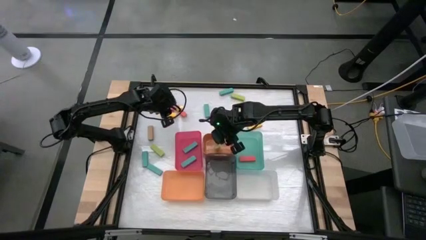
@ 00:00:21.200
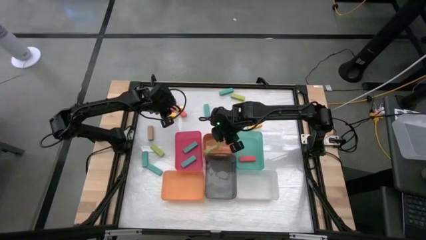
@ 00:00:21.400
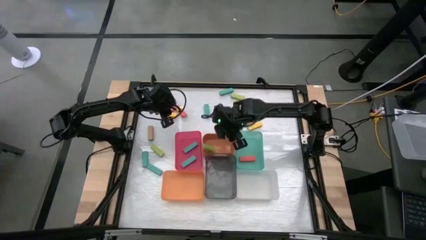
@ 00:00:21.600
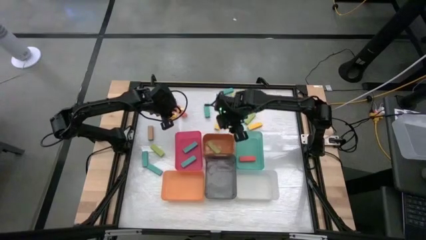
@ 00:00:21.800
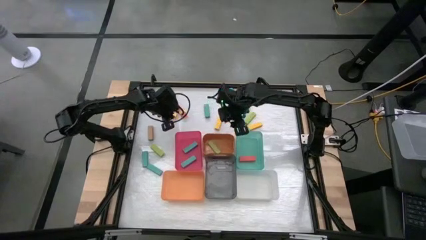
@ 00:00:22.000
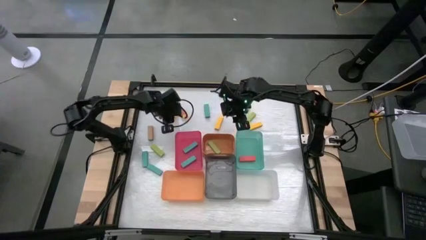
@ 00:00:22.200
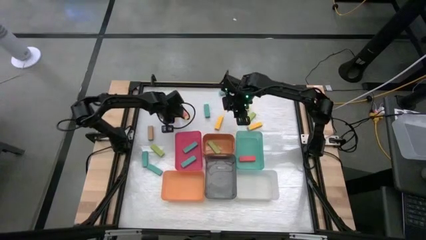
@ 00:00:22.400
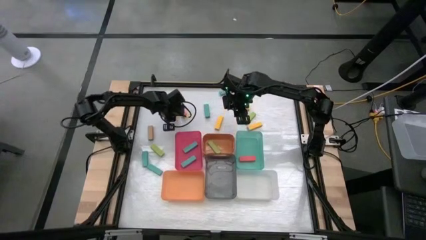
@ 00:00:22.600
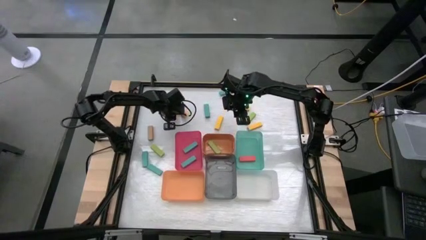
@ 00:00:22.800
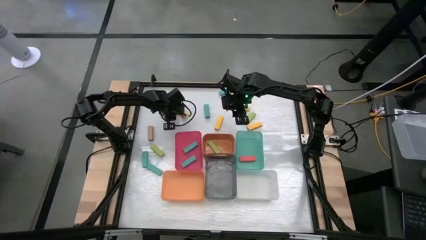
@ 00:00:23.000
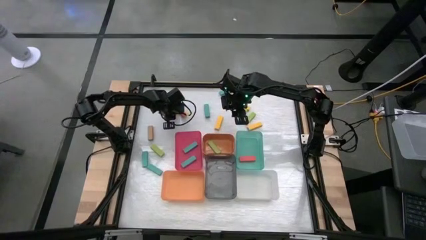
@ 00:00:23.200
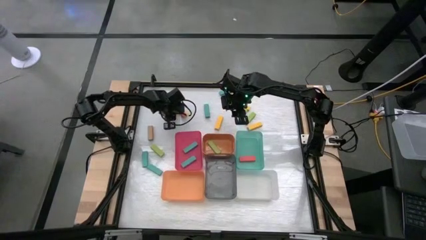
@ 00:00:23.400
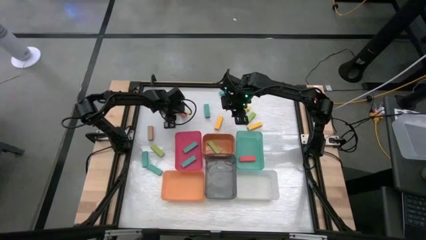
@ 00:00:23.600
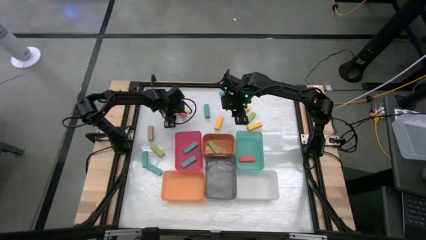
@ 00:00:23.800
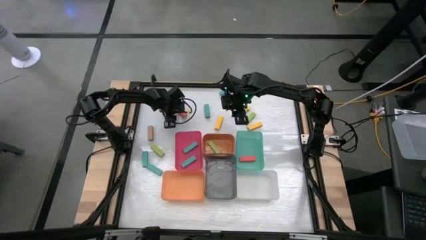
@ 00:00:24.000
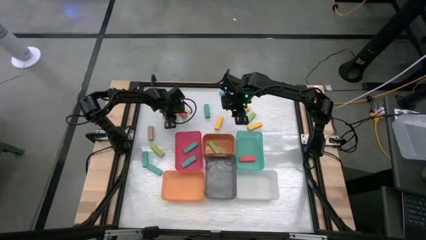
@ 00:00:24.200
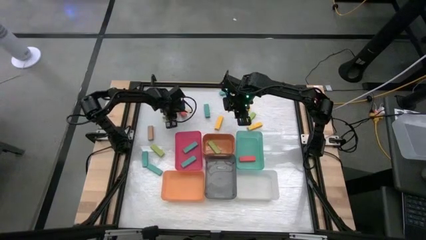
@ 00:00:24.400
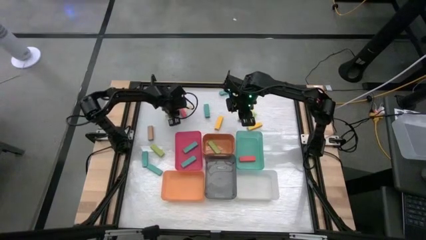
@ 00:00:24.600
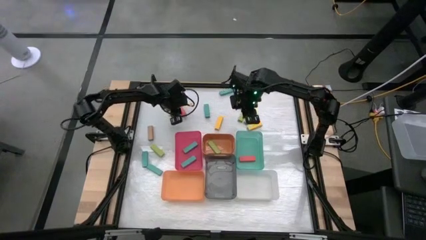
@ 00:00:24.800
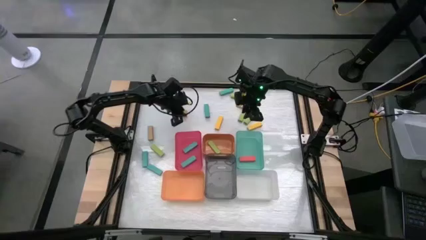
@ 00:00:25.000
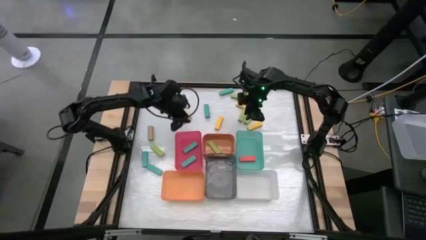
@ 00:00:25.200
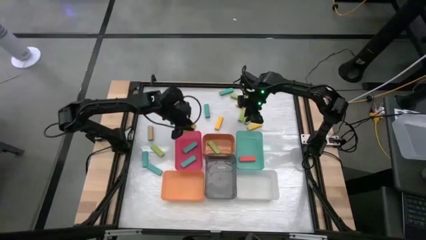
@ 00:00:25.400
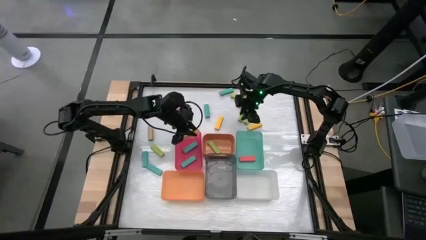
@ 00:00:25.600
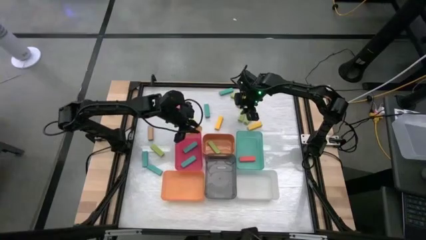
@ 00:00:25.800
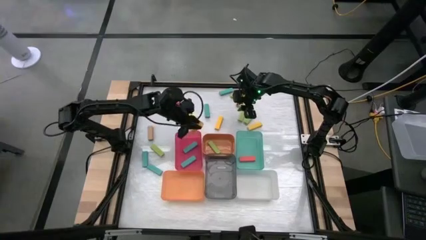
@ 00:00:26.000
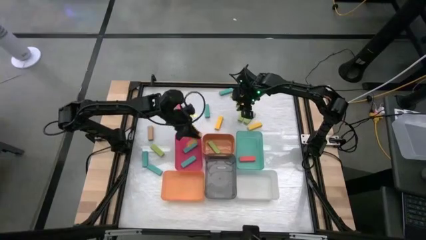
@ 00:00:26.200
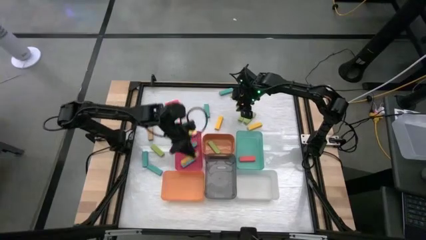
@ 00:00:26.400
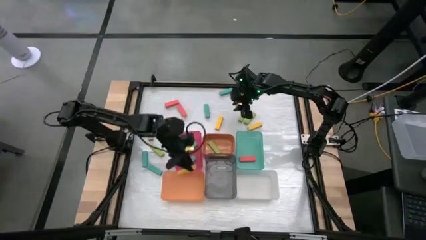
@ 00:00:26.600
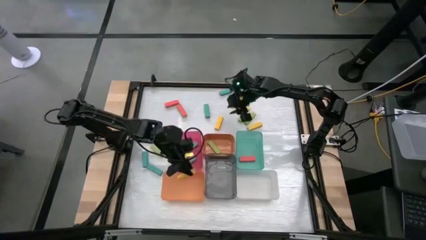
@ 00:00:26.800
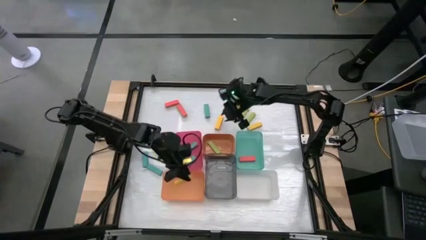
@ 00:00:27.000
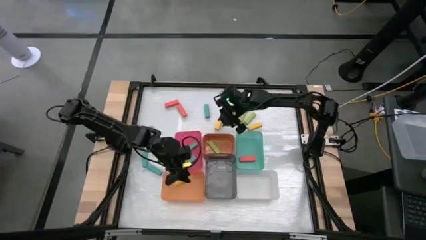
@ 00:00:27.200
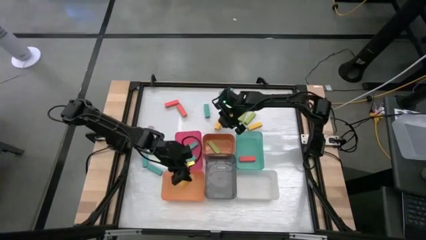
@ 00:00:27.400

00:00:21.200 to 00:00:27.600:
Task: Sort blocks
Put the yellow block into the bottom orange bin

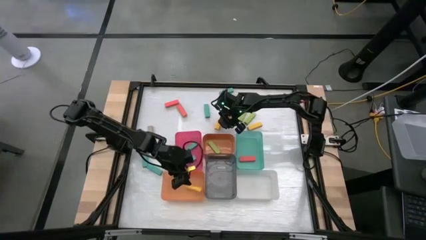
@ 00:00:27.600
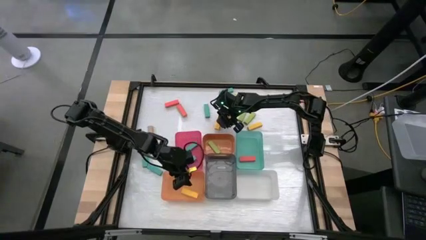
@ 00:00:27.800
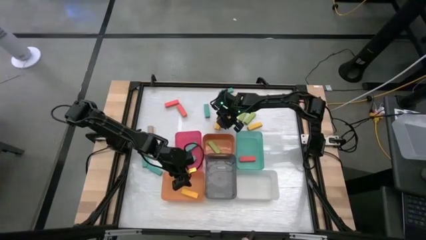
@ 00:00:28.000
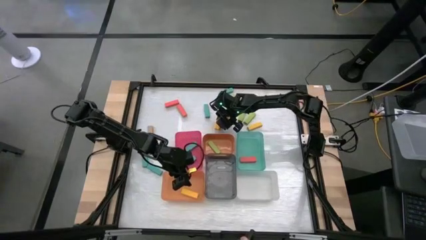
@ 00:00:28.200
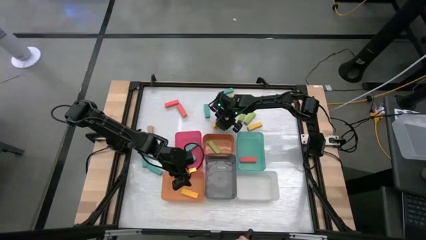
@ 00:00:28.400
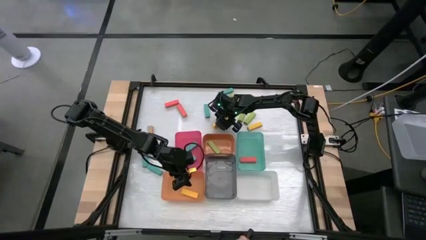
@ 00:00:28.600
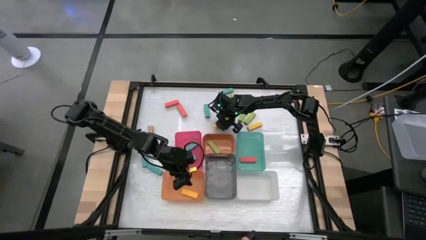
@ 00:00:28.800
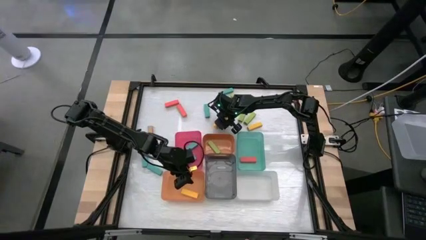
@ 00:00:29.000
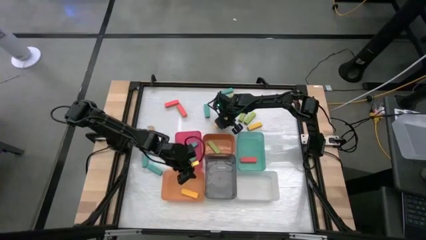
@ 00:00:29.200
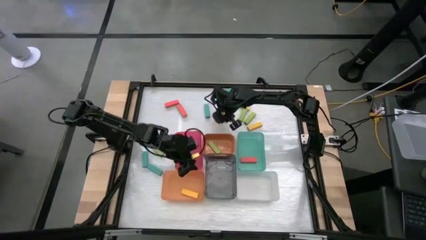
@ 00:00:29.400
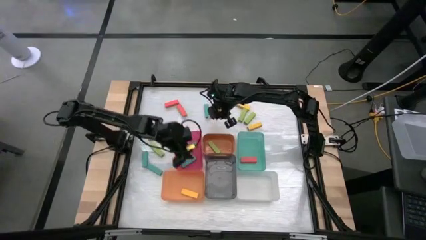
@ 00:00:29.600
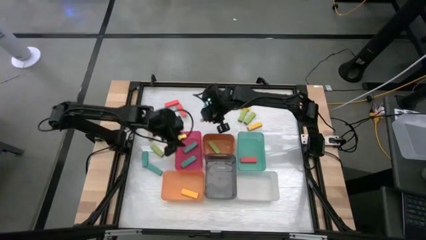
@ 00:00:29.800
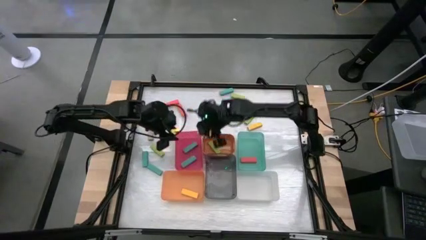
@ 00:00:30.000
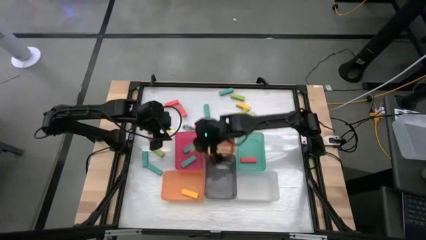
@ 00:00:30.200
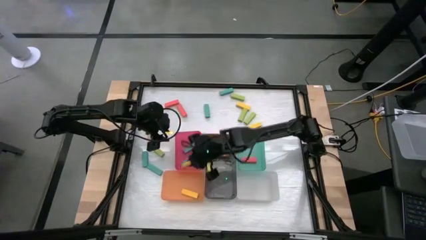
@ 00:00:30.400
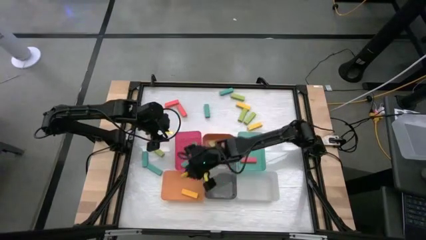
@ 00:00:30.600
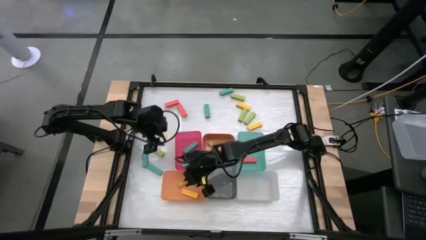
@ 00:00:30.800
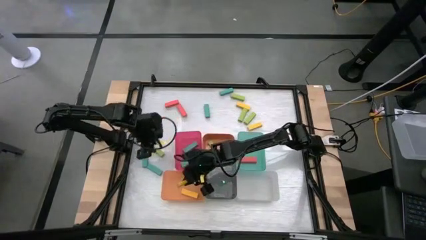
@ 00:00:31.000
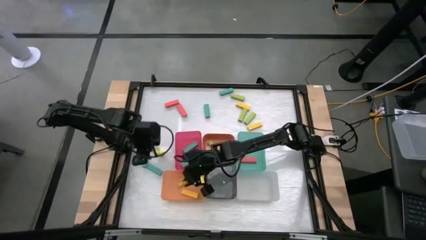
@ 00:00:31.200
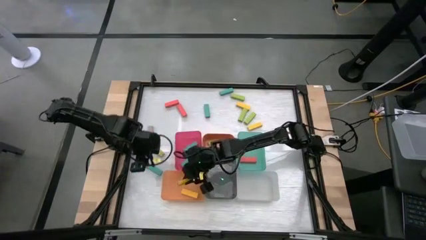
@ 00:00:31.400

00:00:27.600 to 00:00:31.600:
Put the left yellow block into the bottom orange bin

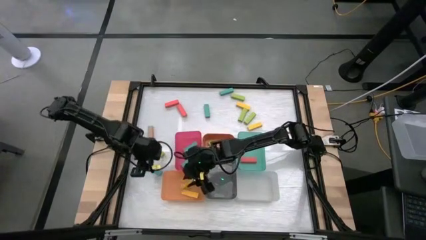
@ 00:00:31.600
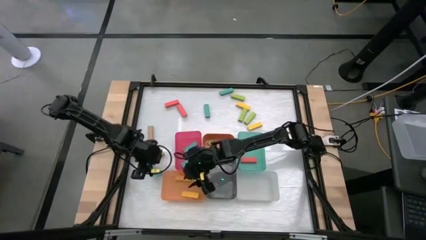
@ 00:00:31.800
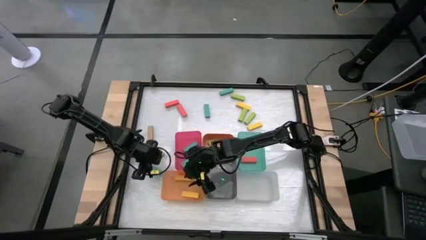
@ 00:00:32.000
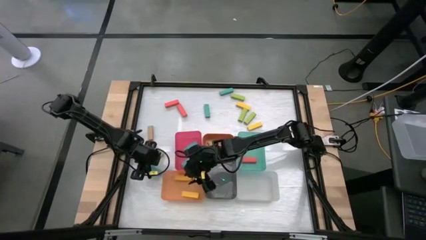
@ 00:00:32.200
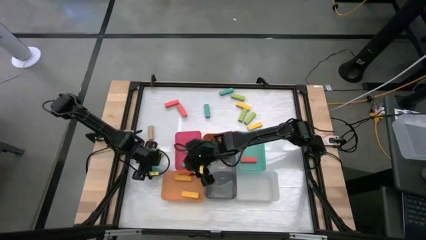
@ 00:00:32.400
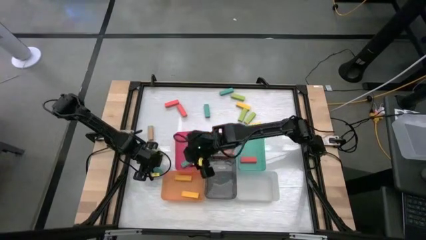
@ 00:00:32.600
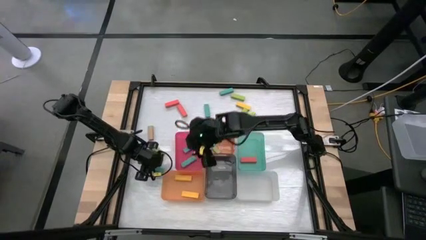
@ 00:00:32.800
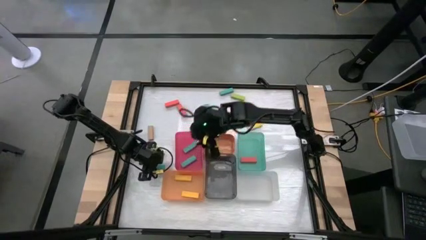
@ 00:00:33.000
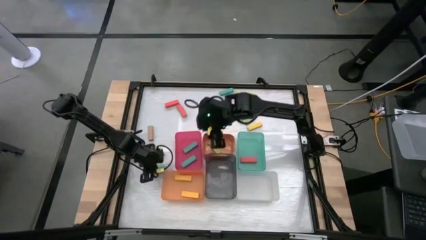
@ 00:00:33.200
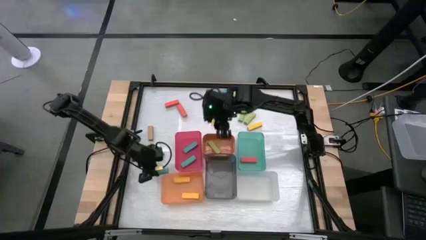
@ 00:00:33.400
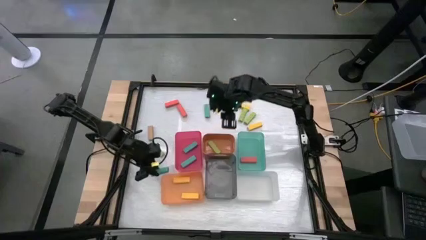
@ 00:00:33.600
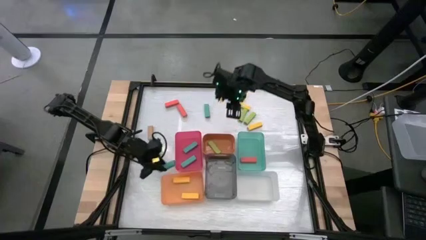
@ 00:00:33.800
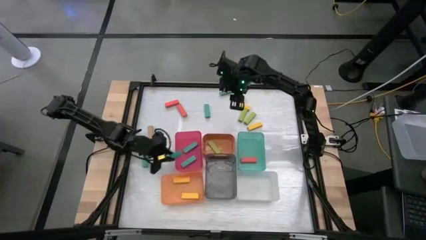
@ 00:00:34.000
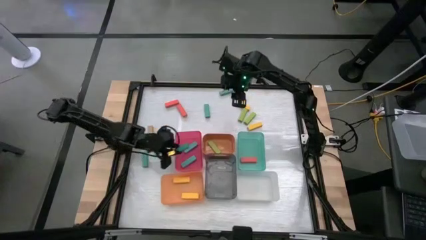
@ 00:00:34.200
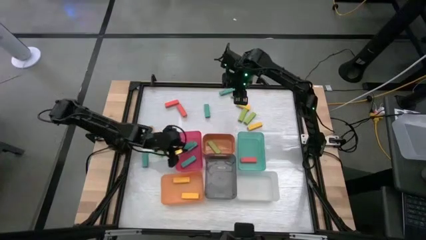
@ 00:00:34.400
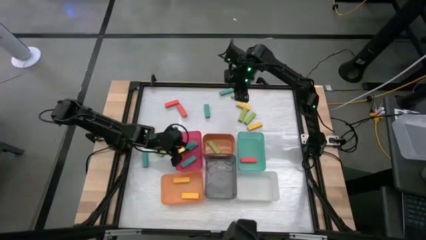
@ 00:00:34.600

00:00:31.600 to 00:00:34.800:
Put the blue block into the pink bin

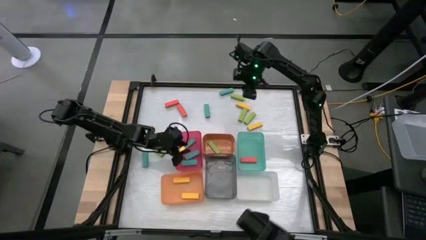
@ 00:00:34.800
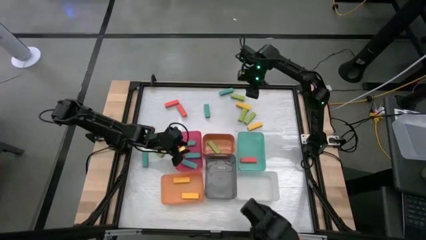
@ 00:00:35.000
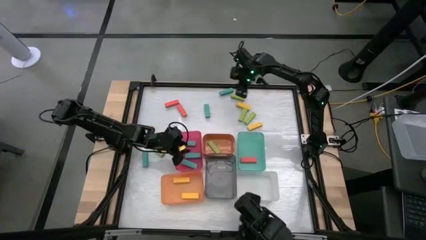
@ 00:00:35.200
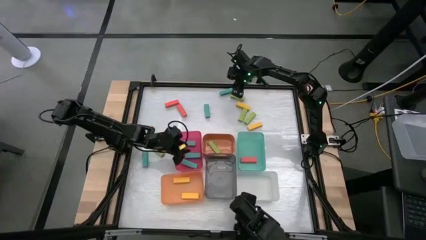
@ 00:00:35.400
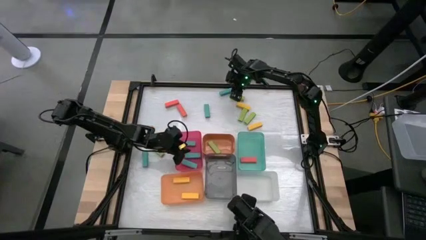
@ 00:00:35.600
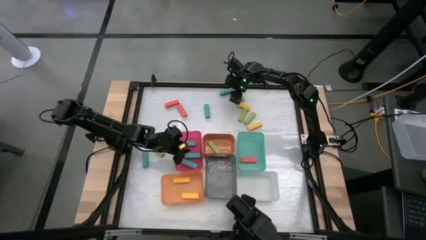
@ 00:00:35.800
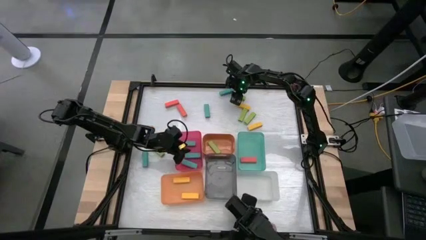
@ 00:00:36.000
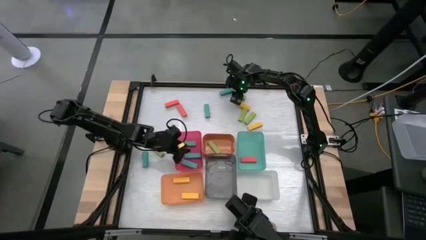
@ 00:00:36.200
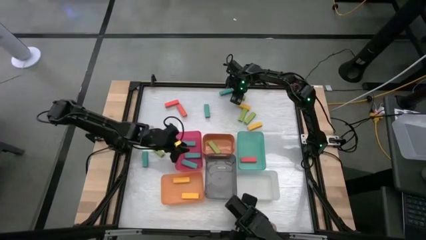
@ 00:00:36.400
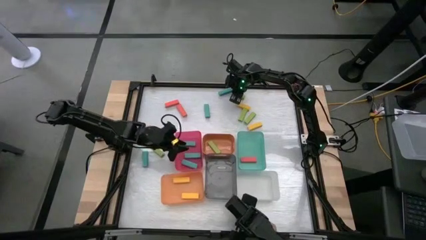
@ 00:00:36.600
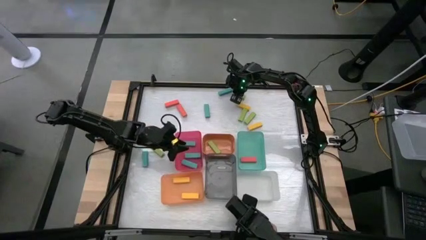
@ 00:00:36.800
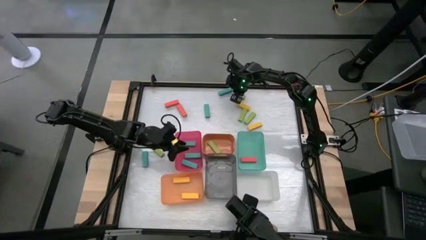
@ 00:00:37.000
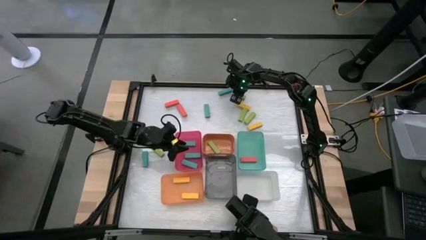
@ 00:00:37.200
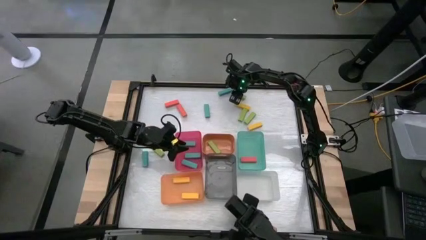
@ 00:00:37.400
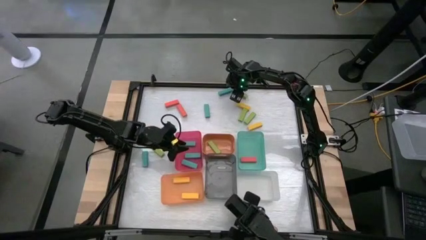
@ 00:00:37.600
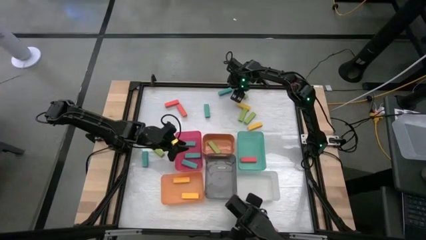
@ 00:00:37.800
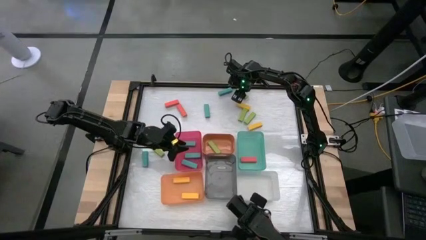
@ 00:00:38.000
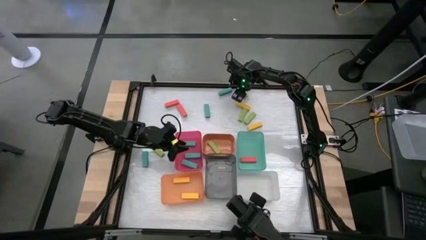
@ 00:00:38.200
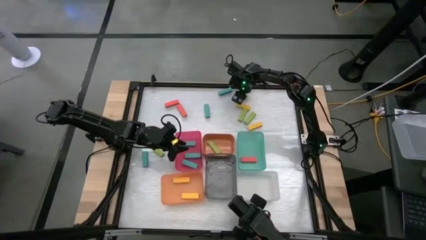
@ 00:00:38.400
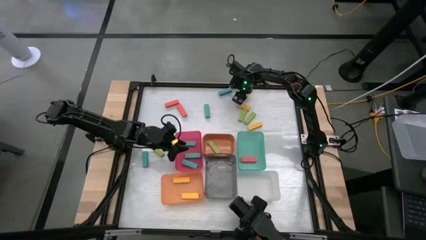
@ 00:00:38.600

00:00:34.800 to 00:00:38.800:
Put the green block into the top orange bin
